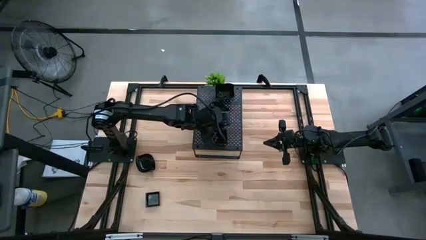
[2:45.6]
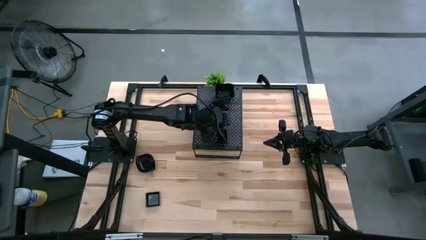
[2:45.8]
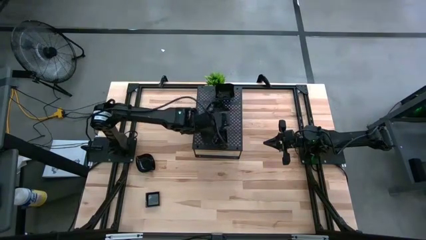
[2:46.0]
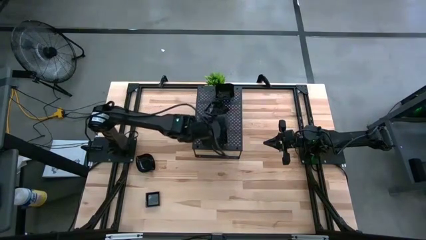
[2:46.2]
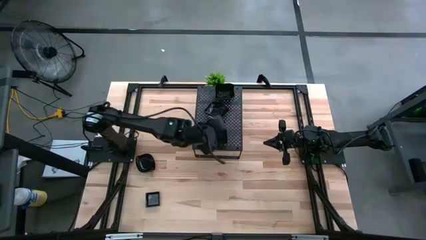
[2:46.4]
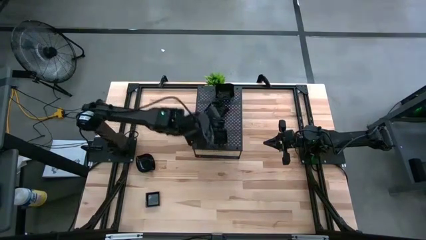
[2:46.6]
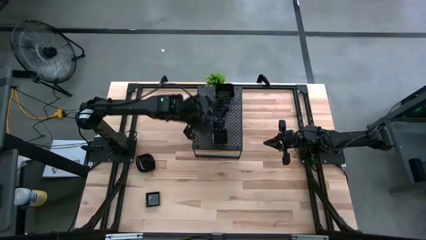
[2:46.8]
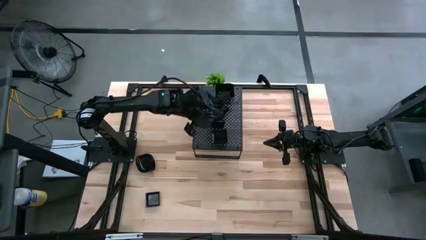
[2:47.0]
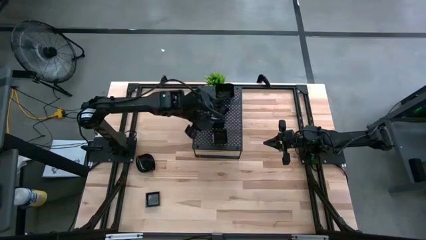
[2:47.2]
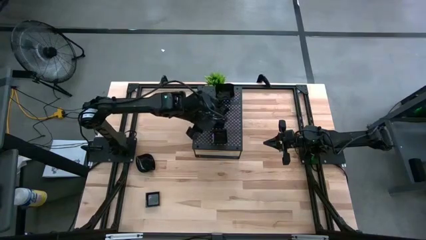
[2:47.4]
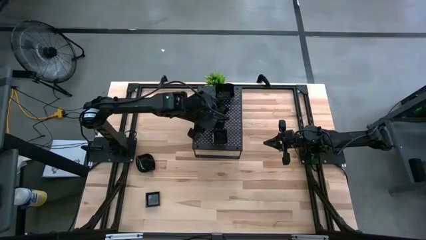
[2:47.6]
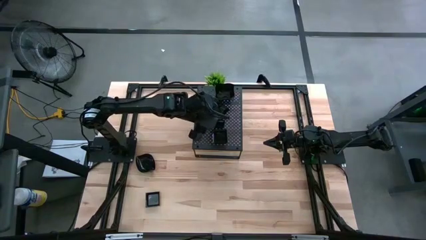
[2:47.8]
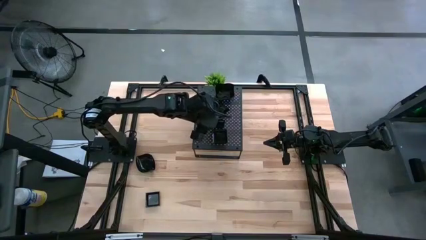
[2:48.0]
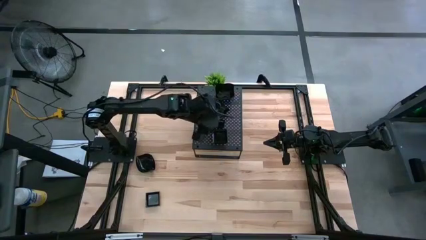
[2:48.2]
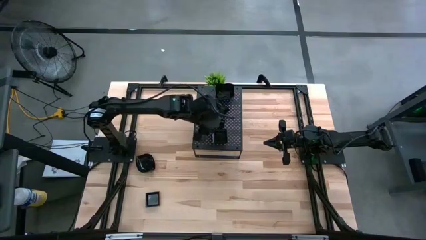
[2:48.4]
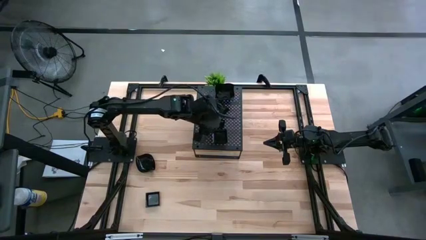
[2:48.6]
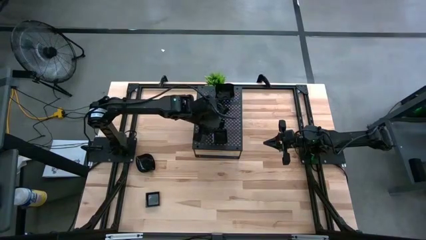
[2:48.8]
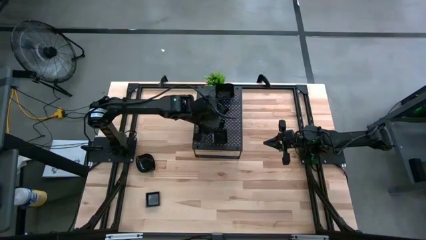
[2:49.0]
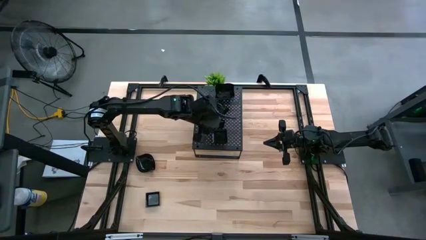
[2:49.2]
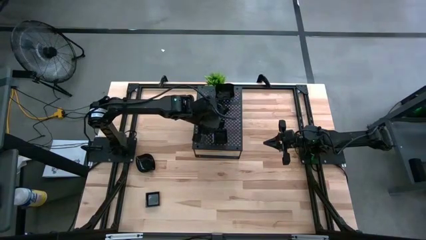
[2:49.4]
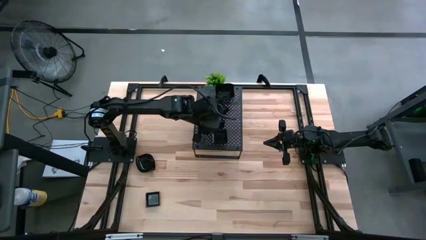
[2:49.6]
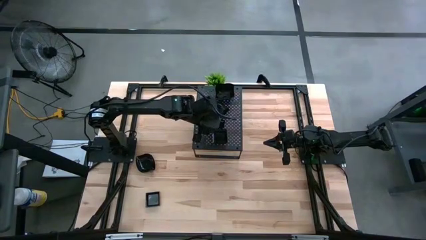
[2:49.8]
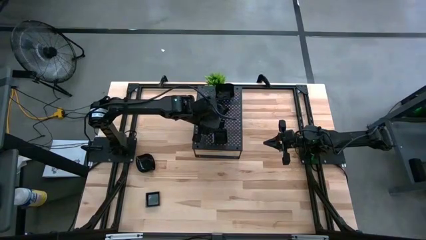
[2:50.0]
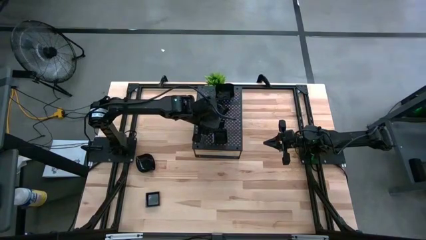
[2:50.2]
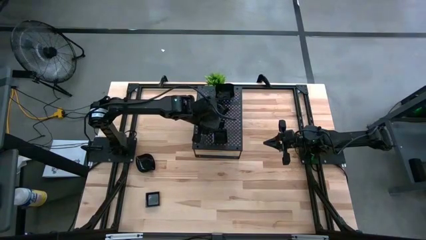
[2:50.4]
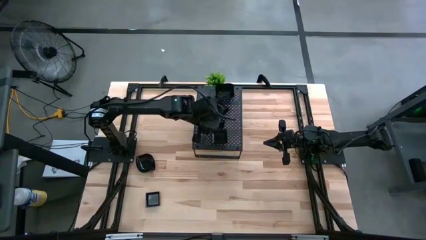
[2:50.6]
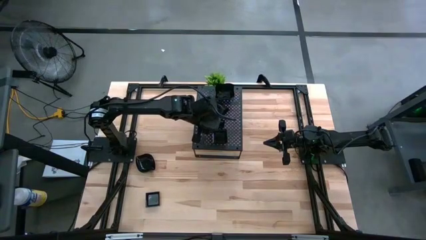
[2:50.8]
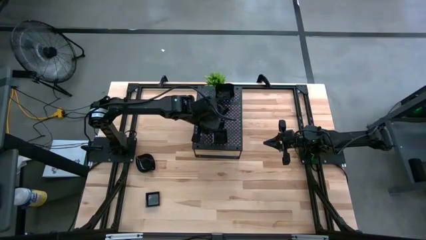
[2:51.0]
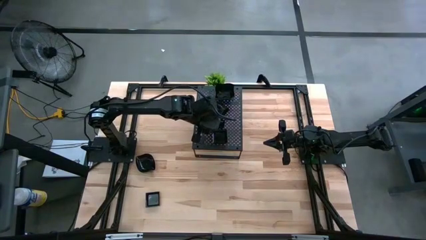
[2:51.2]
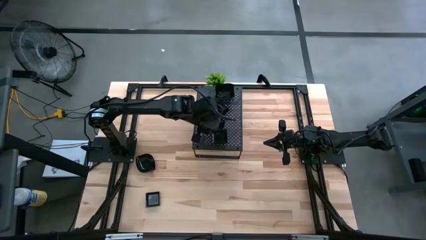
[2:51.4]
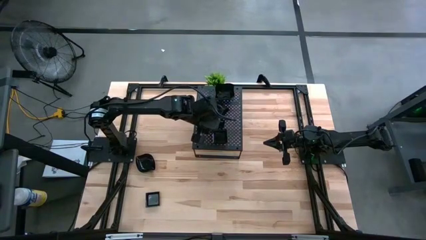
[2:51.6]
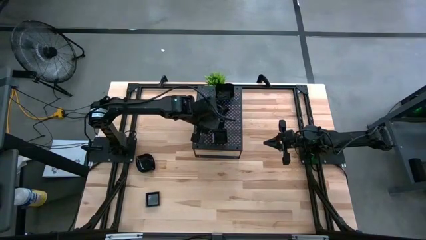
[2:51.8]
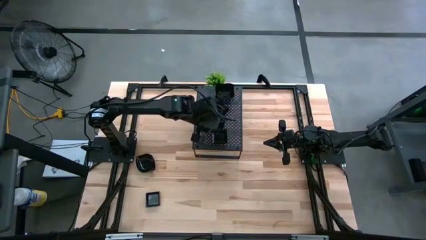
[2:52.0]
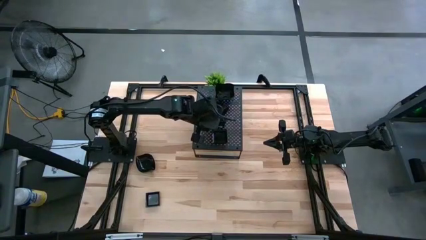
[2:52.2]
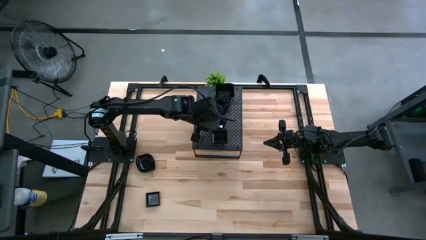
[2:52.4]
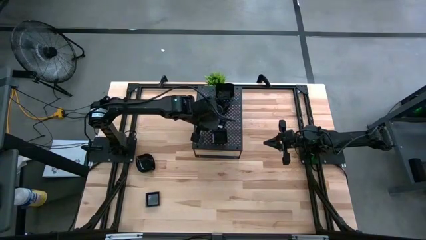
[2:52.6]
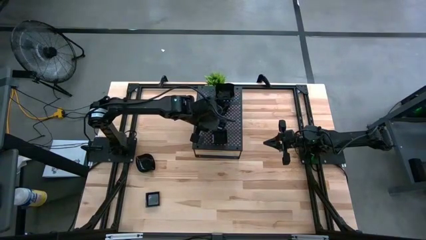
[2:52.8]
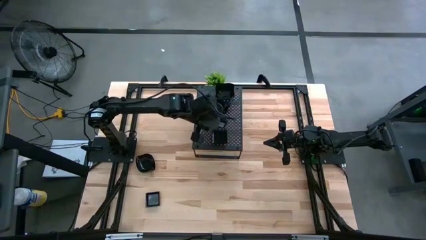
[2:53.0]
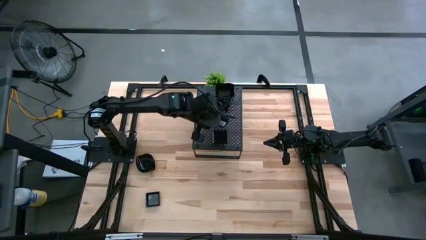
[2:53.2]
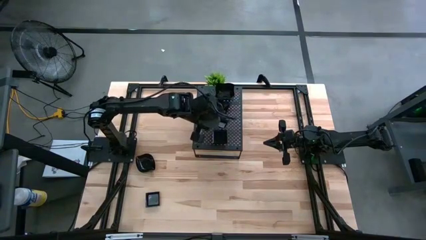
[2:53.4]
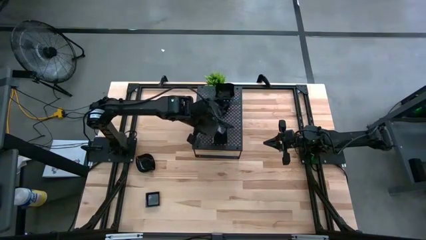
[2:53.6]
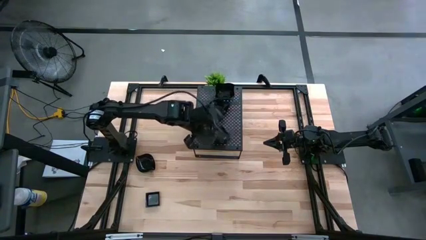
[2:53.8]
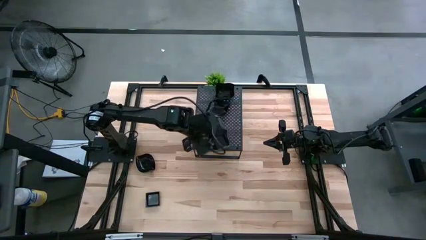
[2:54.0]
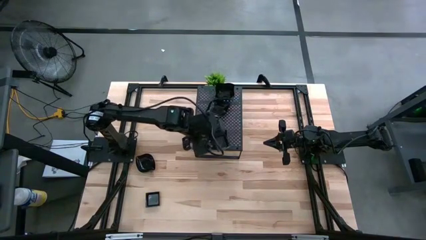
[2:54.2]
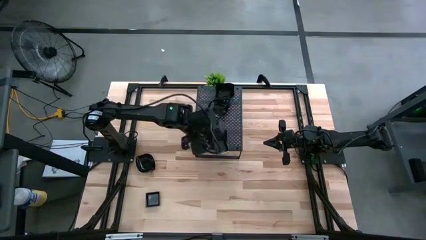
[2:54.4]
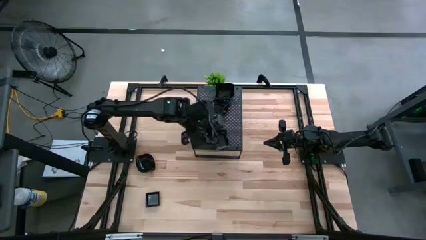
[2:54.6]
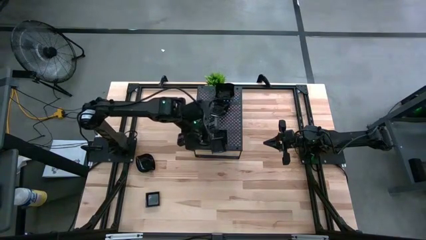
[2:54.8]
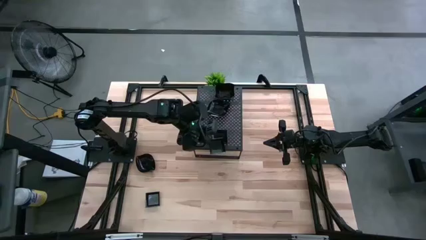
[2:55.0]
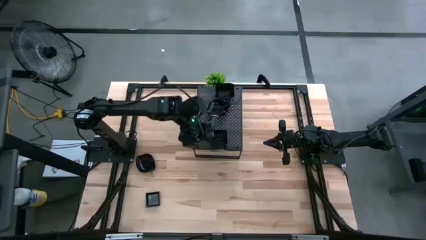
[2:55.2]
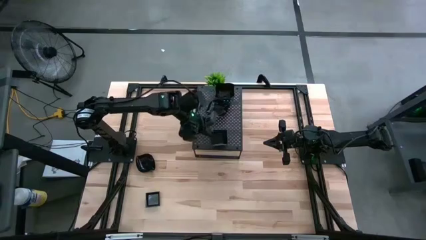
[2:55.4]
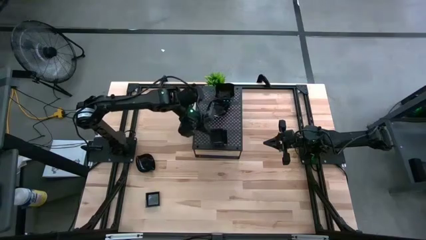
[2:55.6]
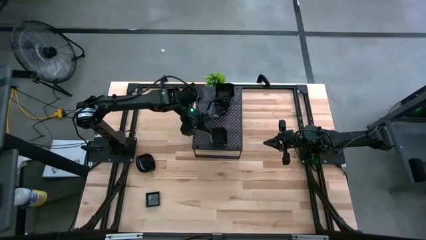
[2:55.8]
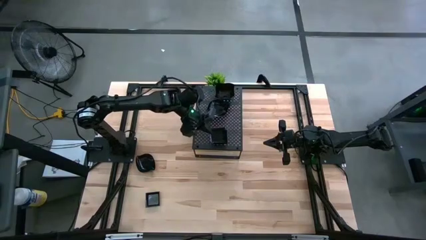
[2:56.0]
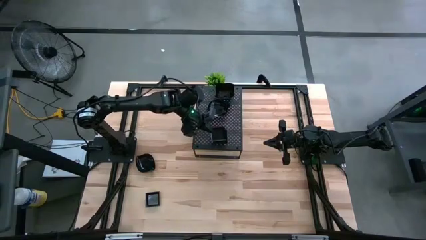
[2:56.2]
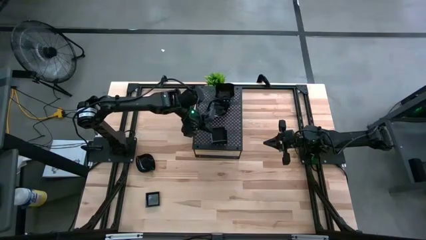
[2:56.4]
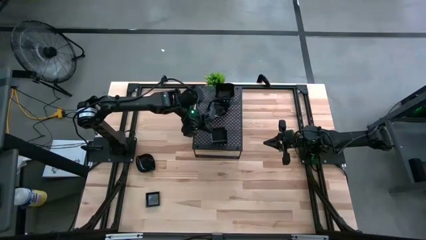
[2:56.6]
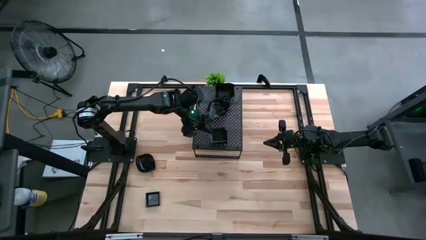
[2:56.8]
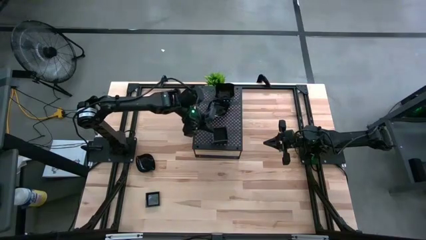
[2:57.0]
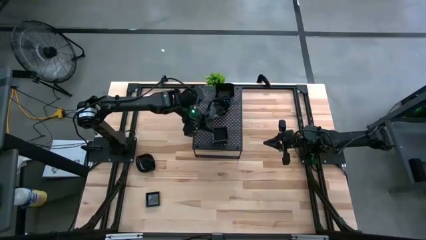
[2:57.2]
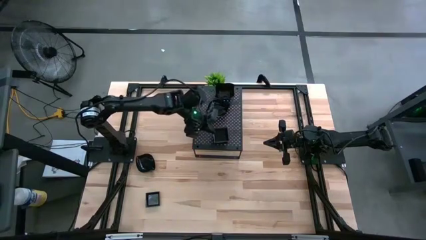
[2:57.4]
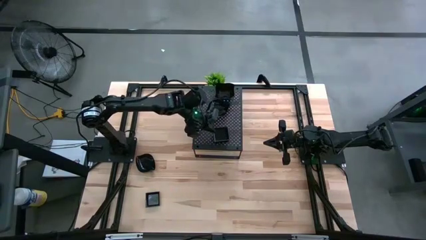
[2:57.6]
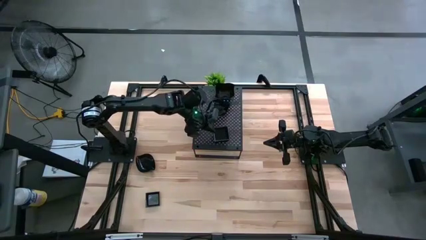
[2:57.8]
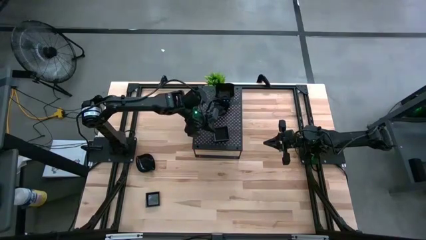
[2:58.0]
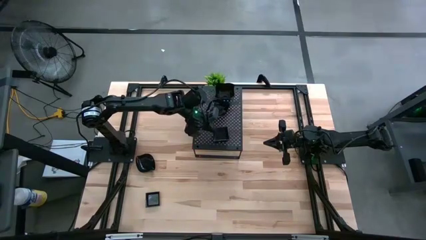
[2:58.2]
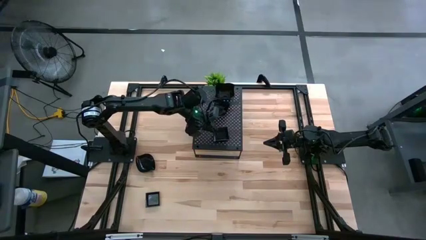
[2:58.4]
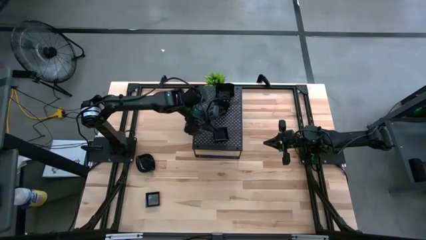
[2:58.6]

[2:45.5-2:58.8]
Task: Pick & Place Mini shaped plates
Stack the square plate on top of the square plate on the shelf

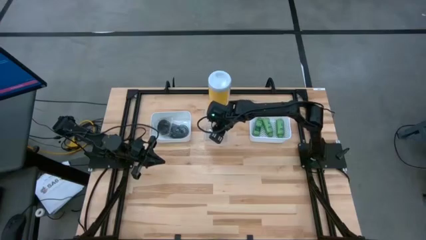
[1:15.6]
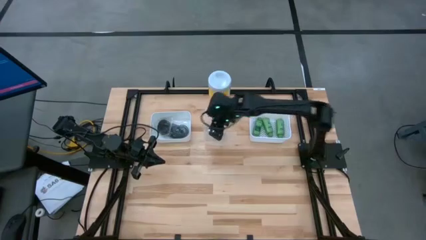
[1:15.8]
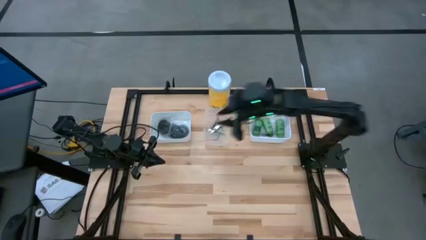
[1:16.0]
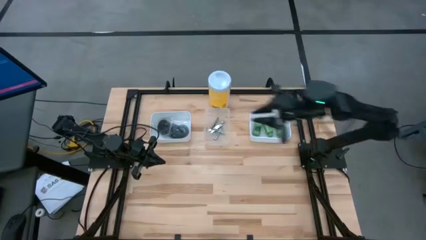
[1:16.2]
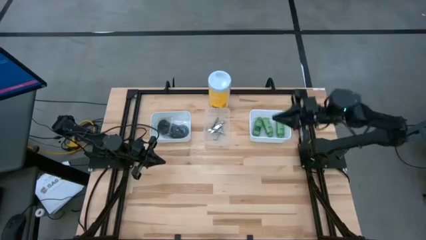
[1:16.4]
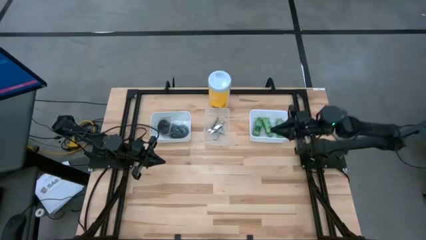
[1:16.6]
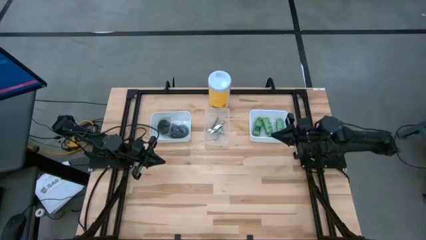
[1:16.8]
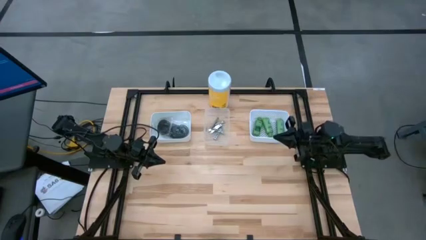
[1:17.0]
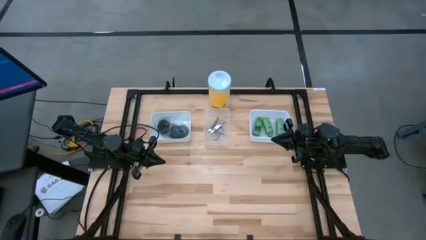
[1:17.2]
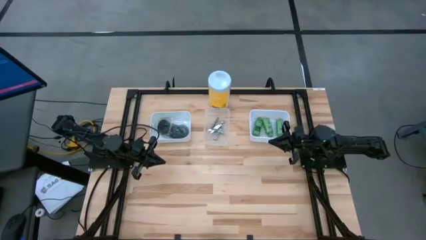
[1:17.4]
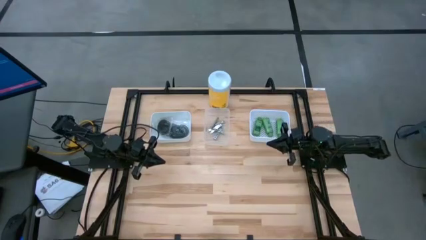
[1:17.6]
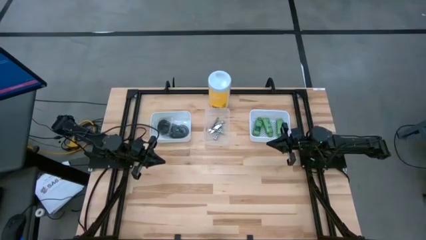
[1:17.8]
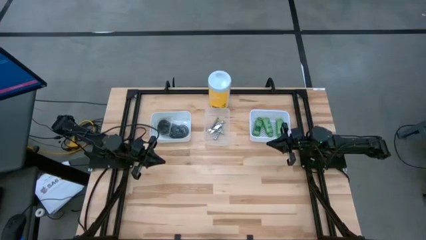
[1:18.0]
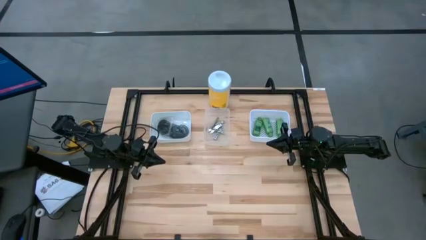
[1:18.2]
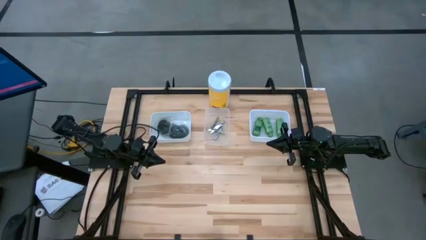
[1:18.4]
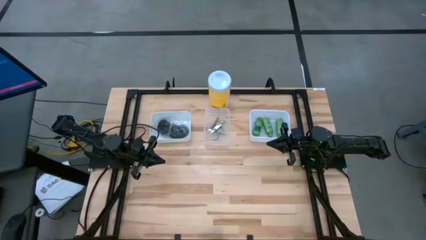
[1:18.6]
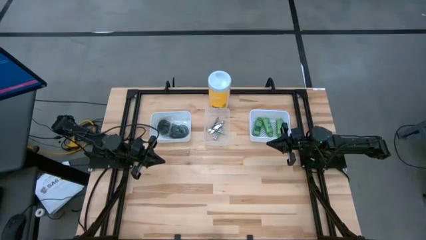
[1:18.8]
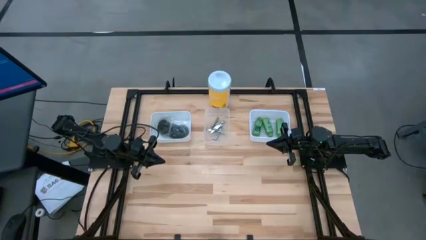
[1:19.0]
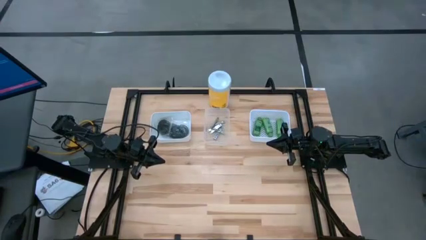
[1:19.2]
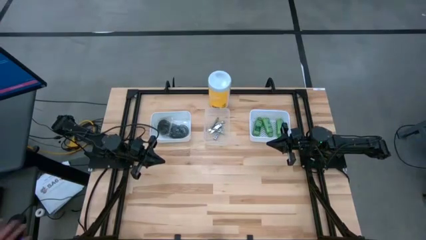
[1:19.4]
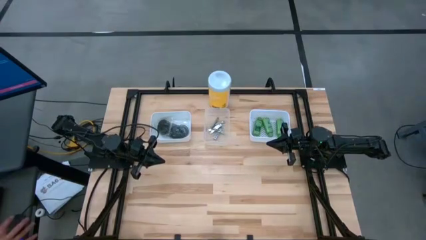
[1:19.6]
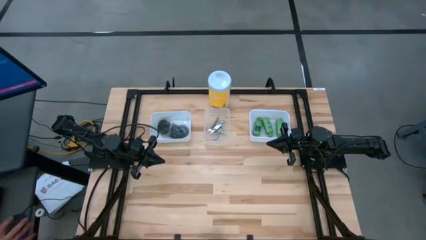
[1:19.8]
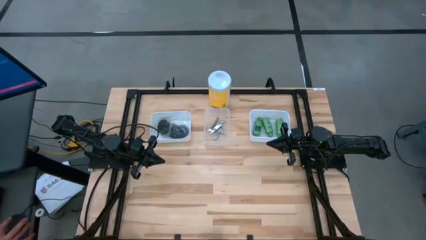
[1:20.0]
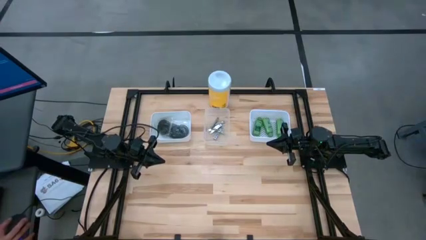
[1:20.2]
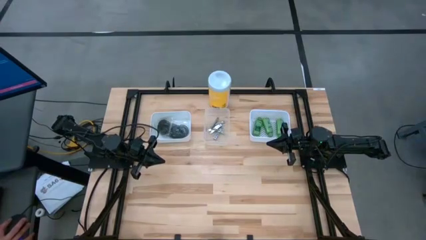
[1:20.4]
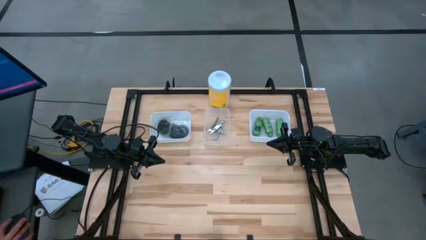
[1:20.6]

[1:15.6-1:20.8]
Task: Pick & Place Travel size toiletries
Return to Home Position
